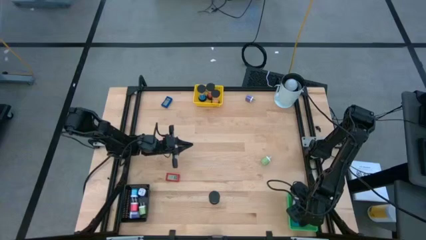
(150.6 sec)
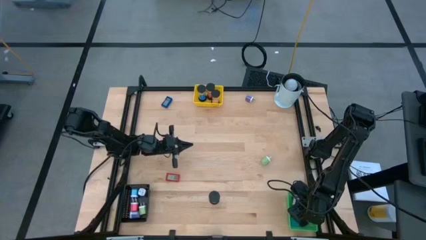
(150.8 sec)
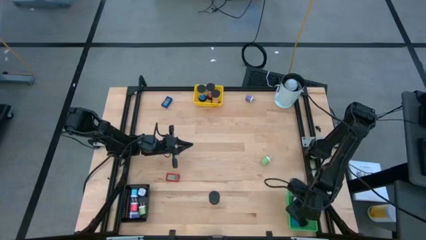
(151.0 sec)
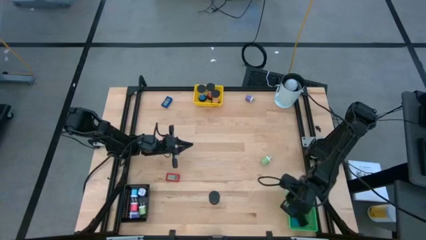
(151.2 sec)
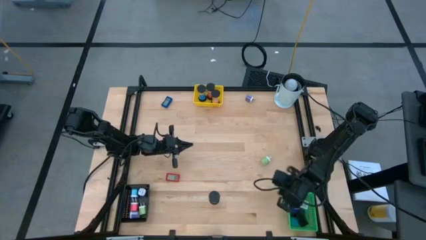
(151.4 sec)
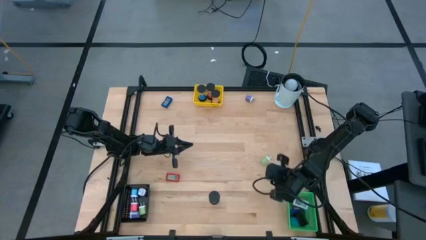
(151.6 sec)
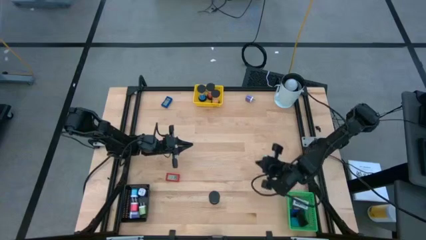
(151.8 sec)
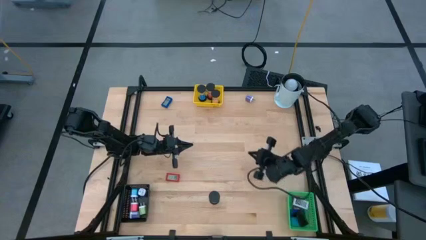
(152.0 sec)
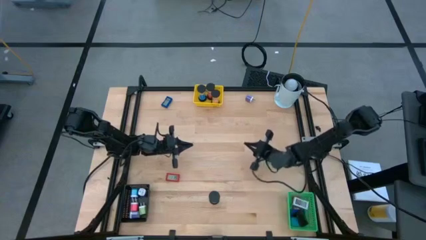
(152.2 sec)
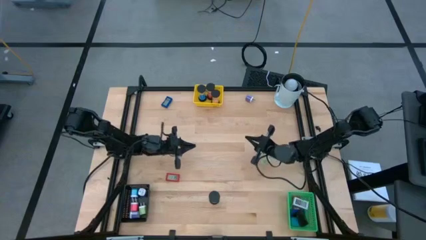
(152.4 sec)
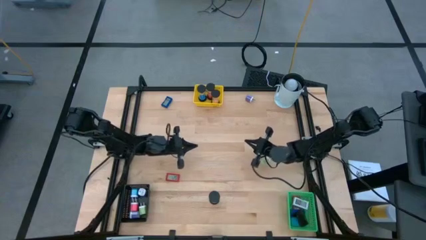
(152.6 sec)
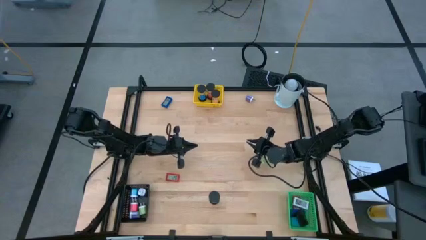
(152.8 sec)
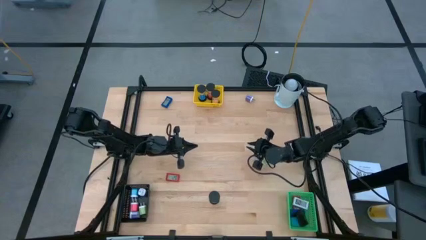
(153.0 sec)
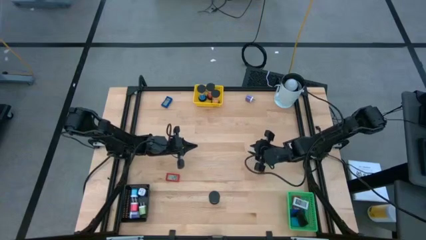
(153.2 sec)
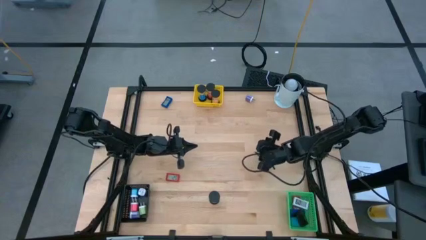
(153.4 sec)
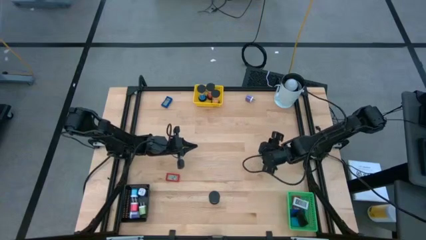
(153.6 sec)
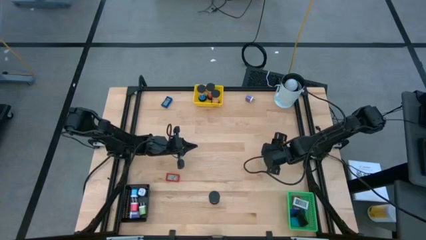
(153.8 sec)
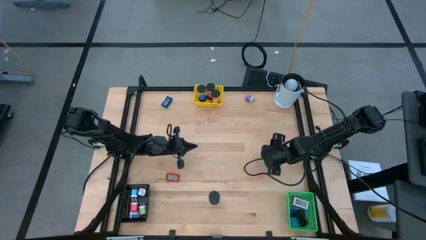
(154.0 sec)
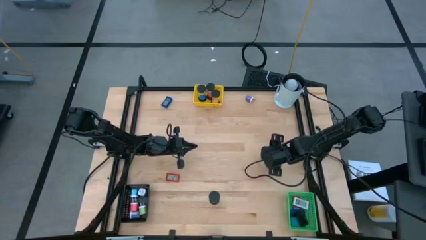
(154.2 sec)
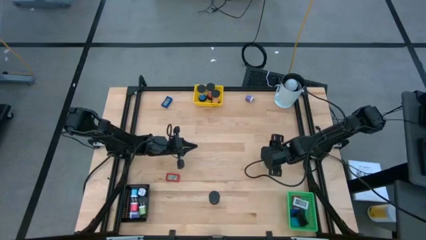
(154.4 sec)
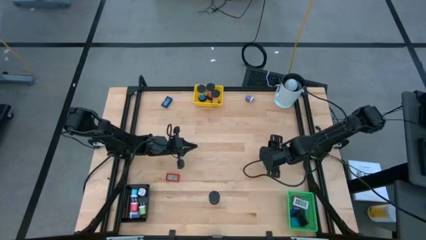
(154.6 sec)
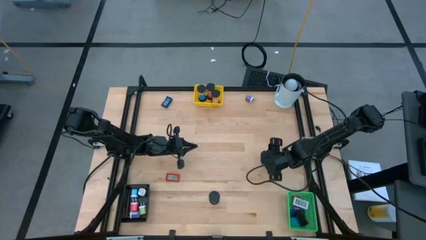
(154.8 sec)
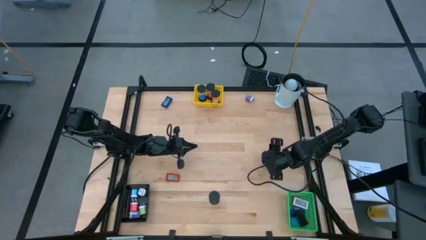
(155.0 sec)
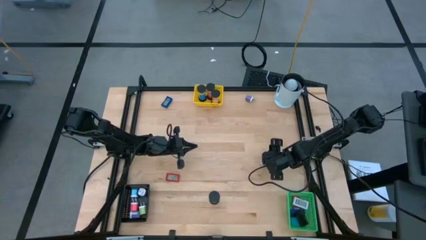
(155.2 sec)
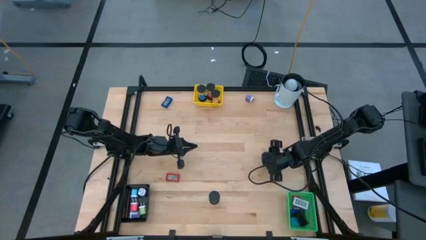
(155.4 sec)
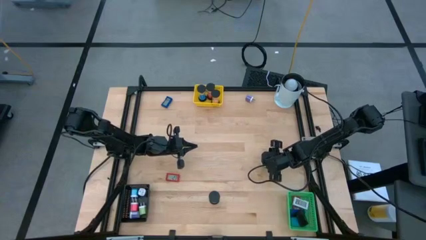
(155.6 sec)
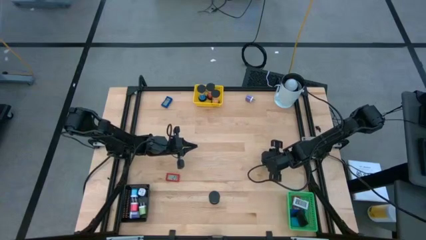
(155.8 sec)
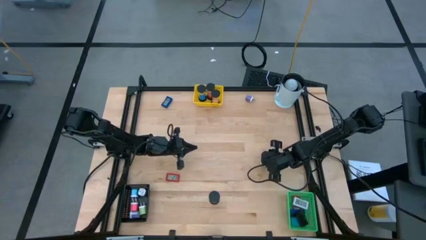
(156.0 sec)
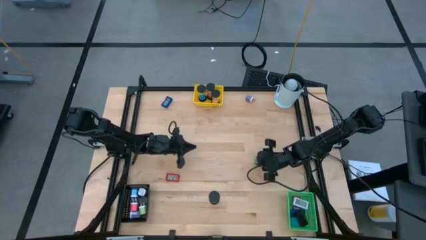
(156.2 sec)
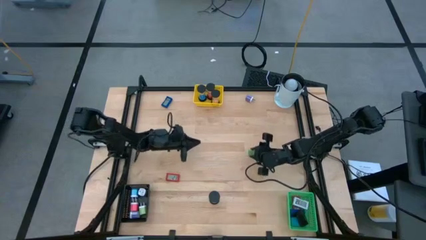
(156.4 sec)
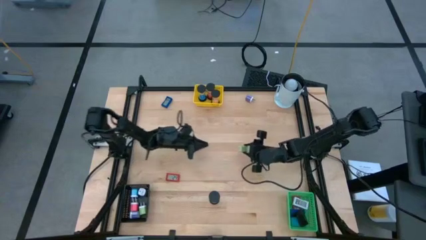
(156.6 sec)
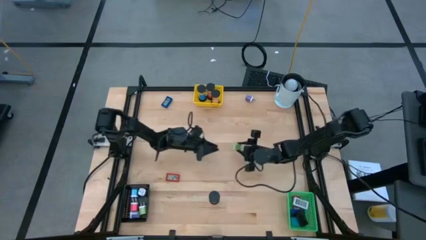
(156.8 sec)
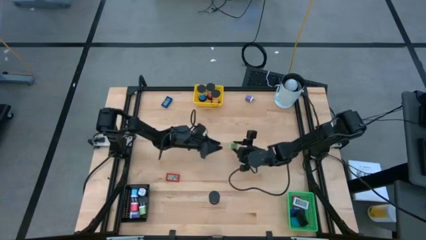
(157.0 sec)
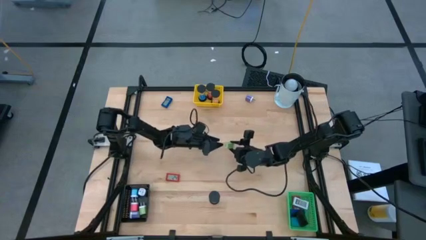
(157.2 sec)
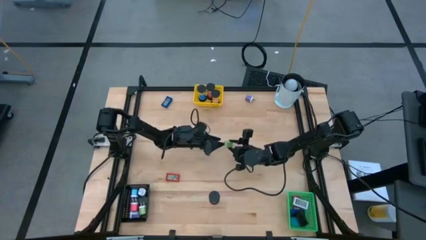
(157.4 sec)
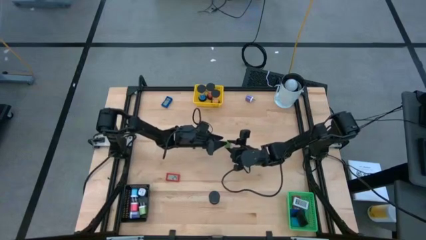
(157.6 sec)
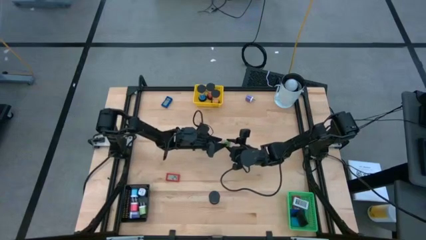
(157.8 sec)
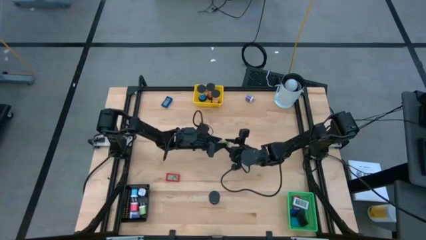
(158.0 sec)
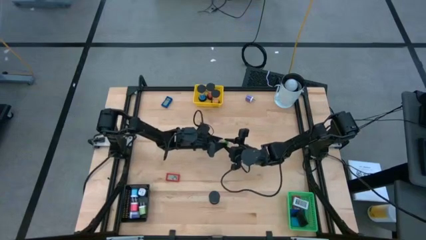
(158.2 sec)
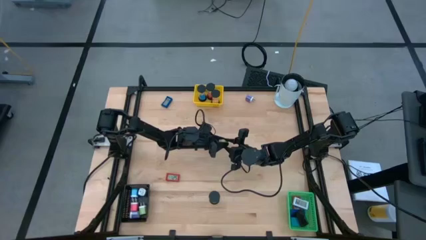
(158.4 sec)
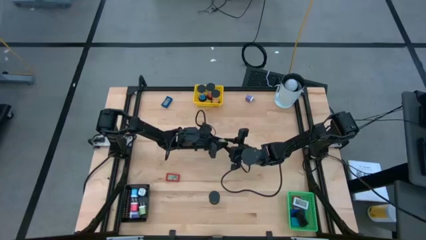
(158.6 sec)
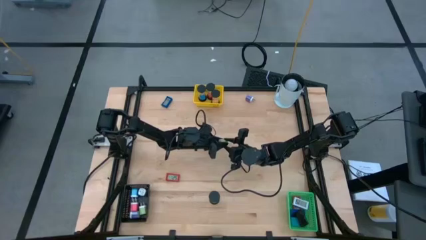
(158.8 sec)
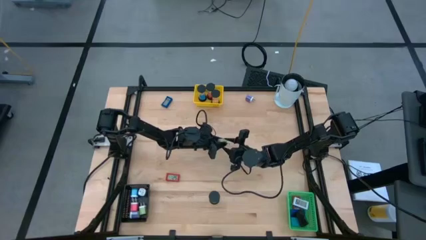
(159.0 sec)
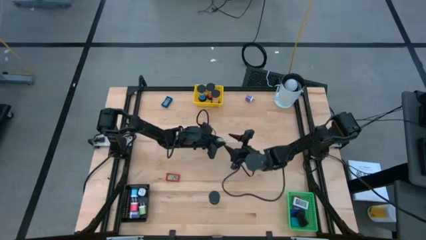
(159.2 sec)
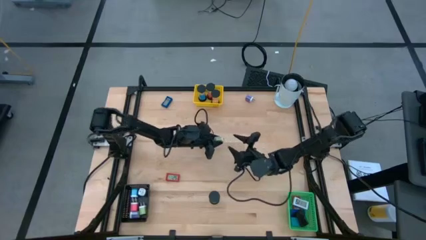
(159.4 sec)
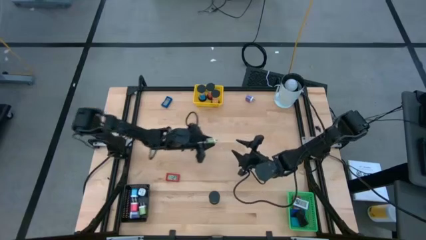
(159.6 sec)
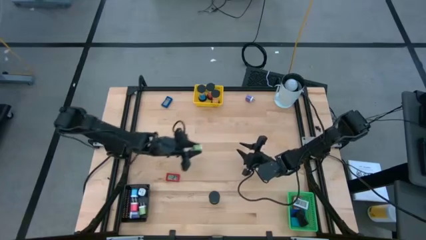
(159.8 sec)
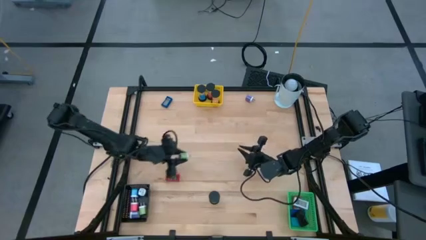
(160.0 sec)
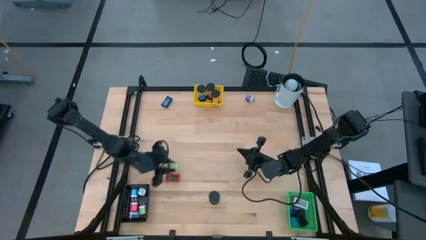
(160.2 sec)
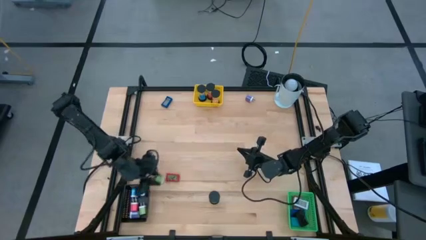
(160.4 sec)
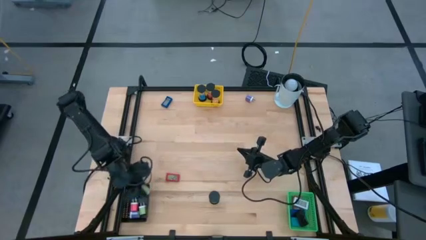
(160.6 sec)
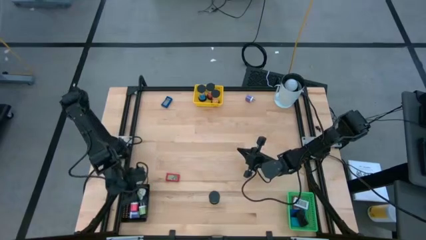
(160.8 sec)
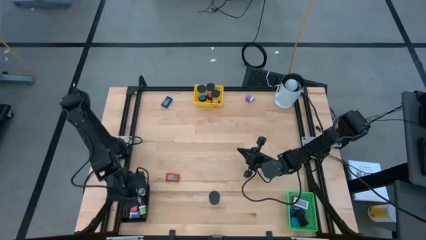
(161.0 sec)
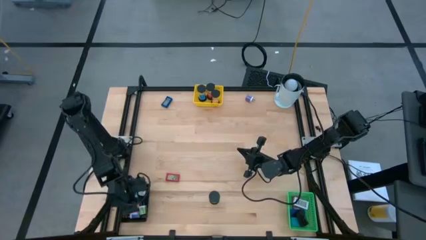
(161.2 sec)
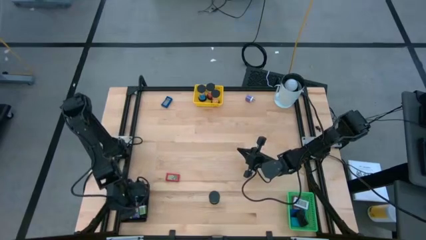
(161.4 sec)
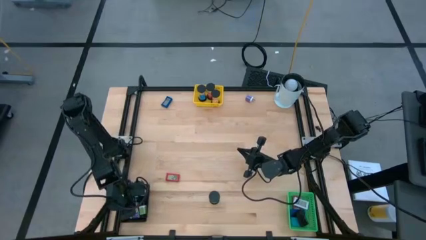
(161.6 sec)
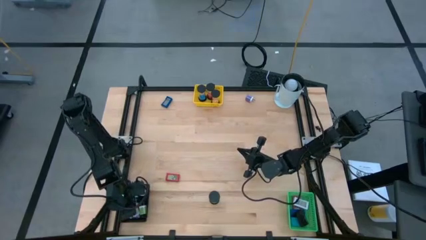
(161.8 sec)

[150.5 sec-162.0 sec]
Task: Pick & Place Office items
Put the green charger adapter into the black bin

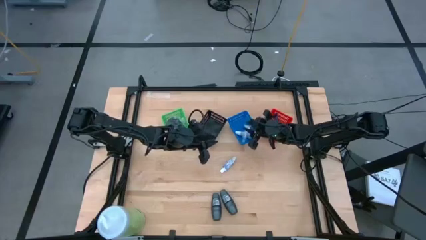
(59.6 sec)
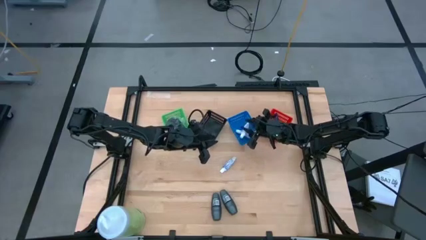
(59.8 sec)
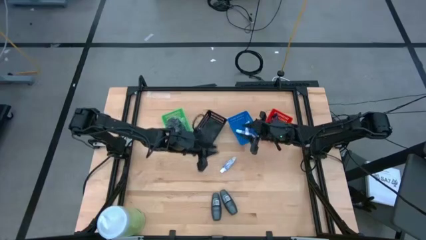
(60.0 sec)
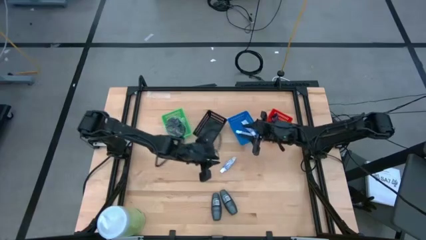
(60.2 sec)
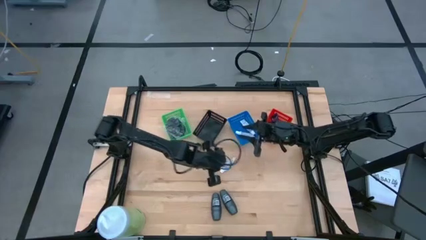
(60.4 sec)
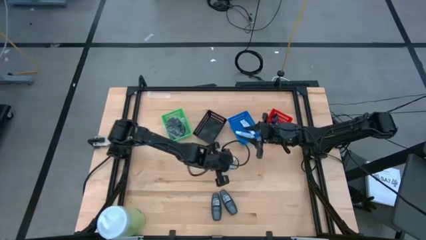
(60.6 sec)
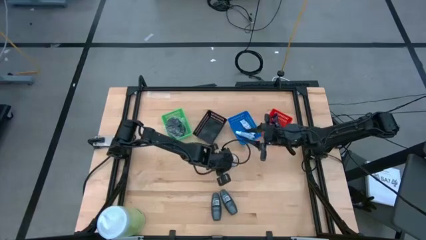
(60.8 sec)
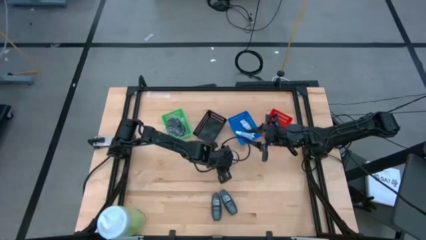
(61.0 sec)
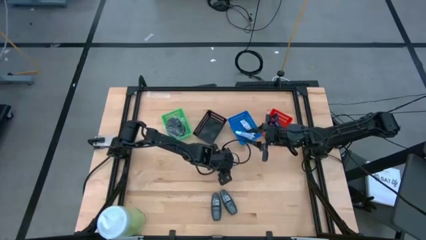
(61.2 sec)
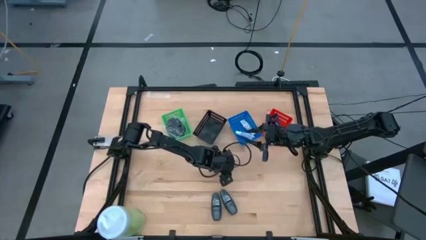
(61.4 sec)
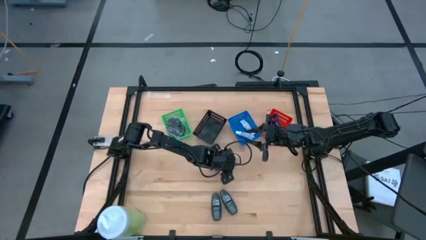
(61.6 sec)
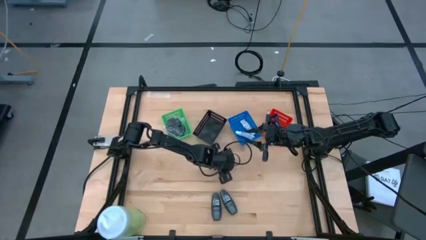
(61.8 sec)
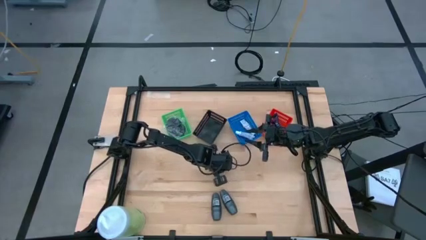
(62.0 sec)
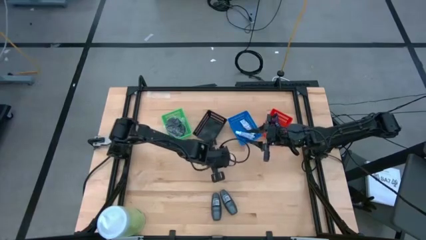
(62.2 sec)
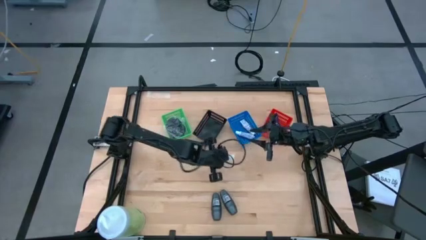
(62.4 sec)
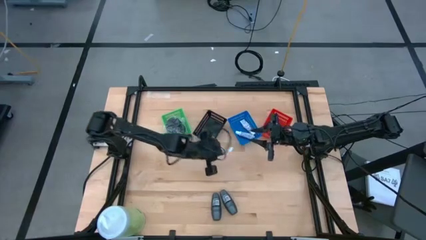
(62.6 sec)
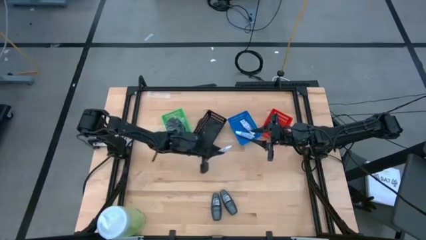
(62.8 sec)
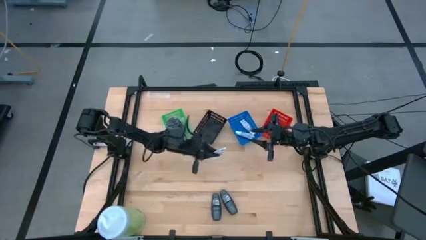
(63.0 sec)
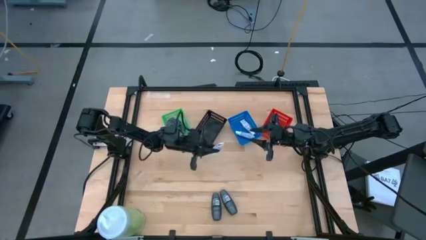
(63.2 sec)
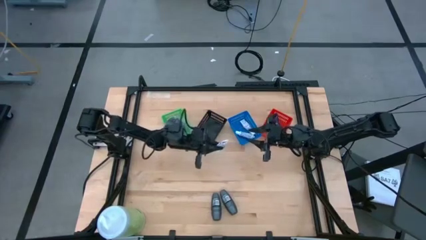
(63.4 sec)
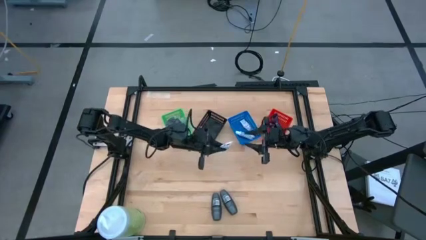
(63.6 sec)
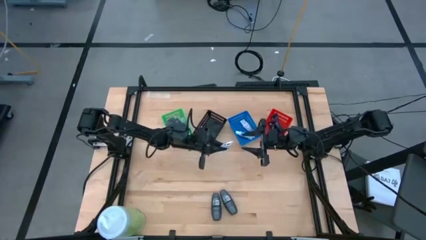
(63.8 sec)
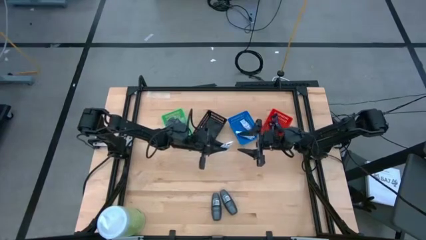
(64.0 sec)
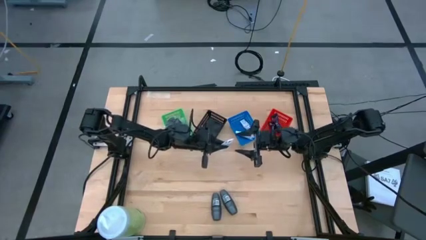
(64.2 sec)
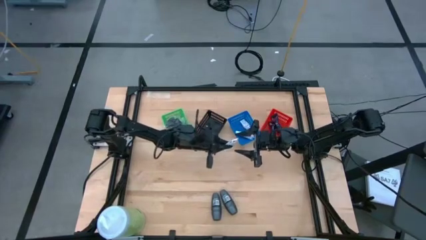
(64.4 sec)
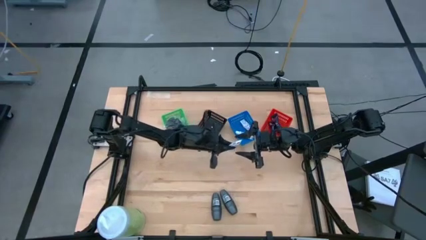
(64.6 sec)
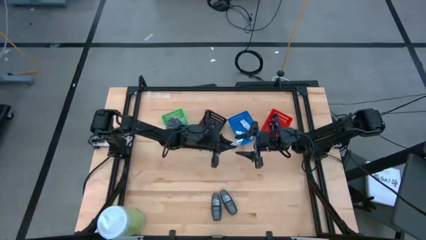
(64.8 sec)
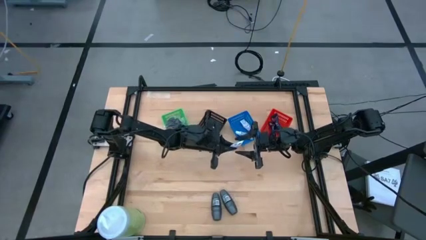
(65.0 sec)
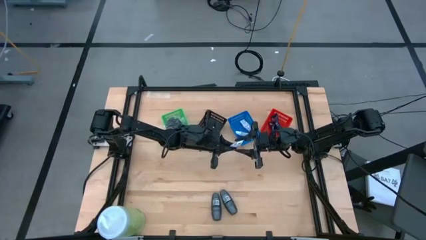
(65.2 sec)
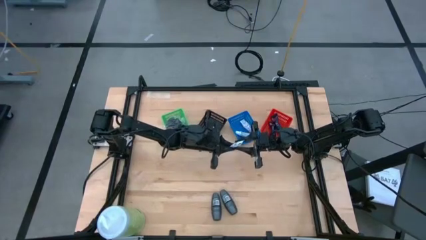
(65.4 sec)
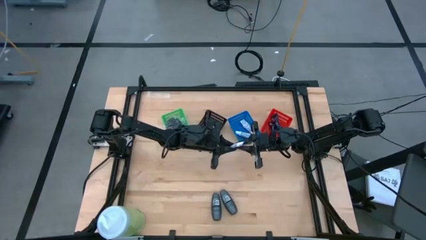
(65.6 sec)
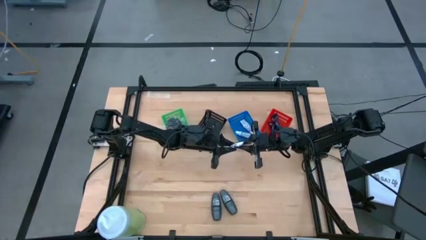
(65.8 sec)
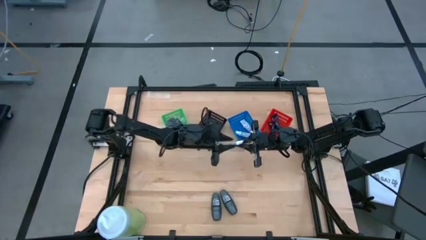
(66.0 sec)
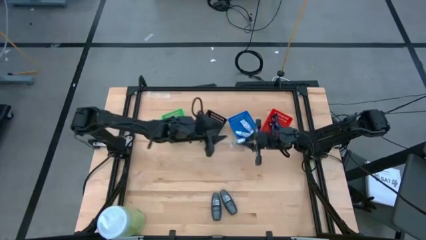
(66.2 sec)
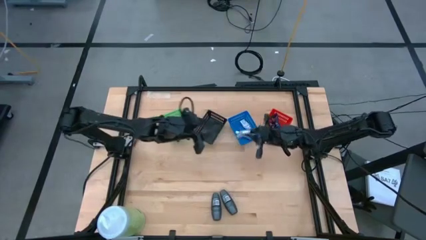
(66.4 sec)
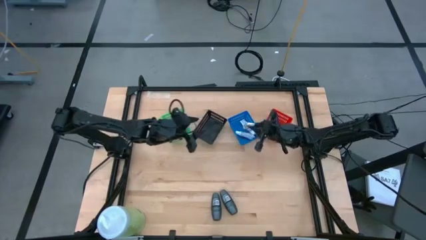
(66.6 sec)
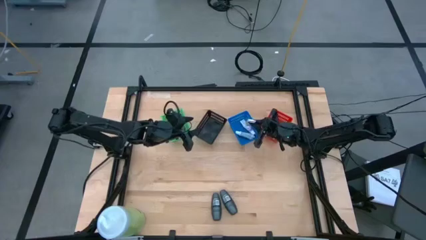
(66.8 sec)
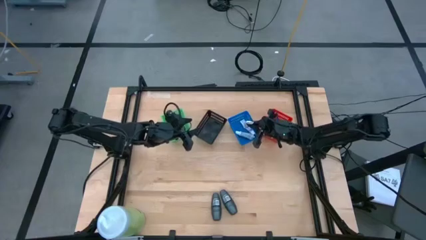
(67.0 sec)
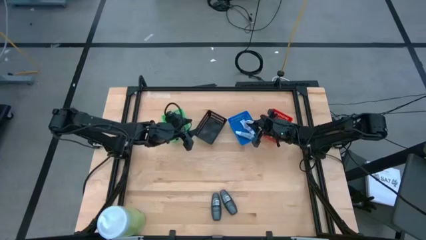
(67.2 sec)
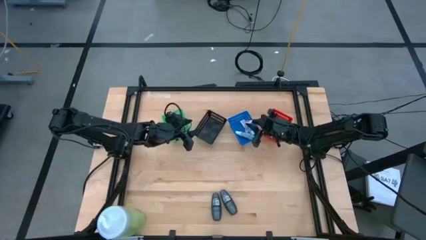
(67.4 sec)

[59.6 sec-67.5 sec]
Task: Pick & Place Travel size toiletries
Put the white toothpaste into the blue bin
